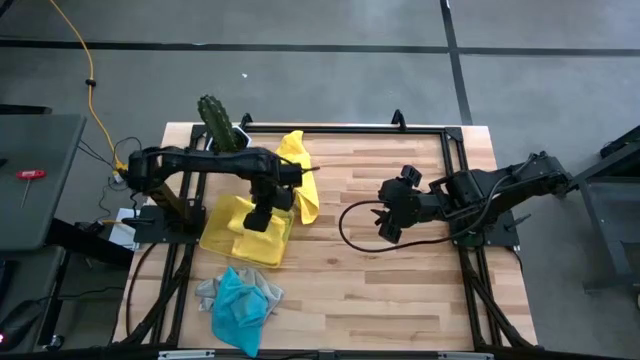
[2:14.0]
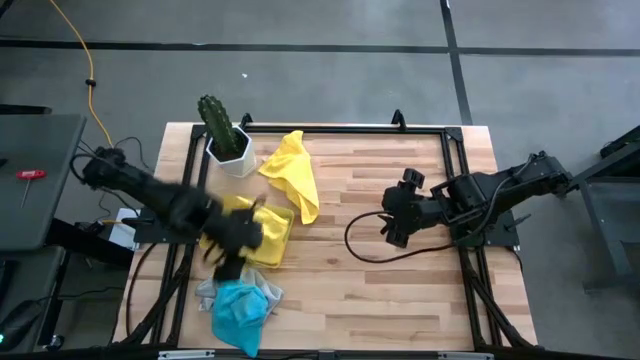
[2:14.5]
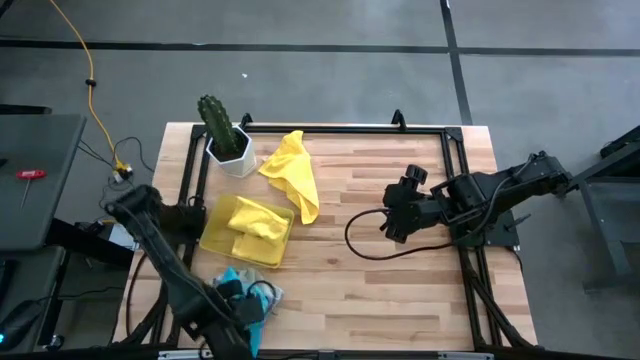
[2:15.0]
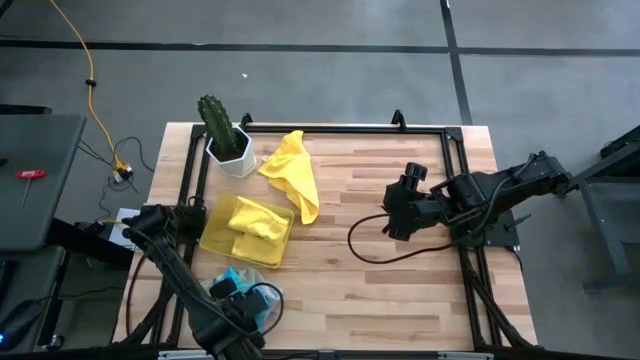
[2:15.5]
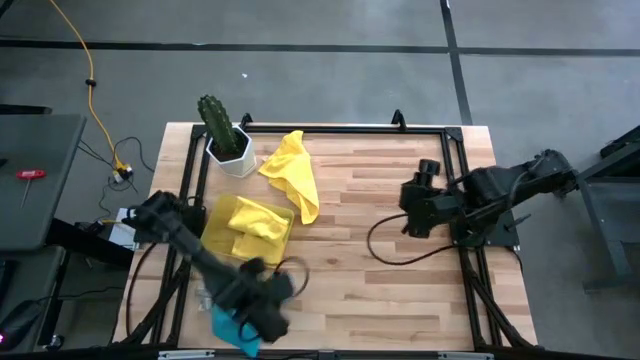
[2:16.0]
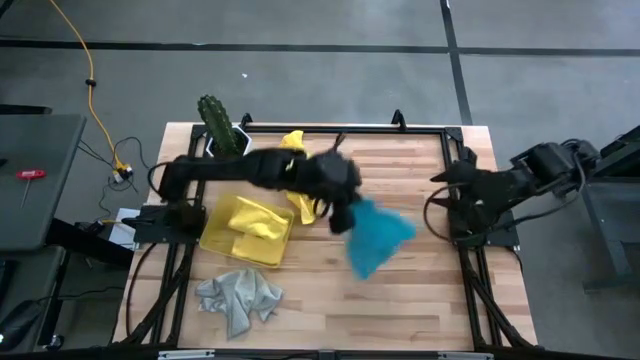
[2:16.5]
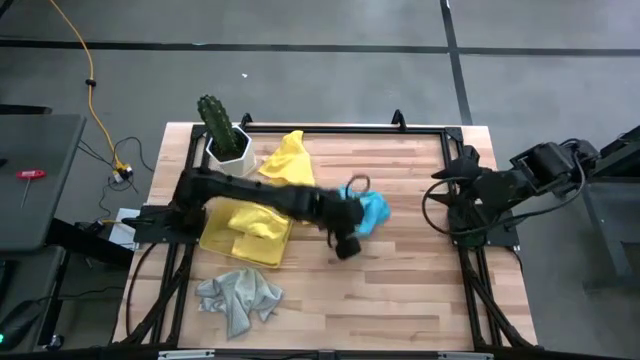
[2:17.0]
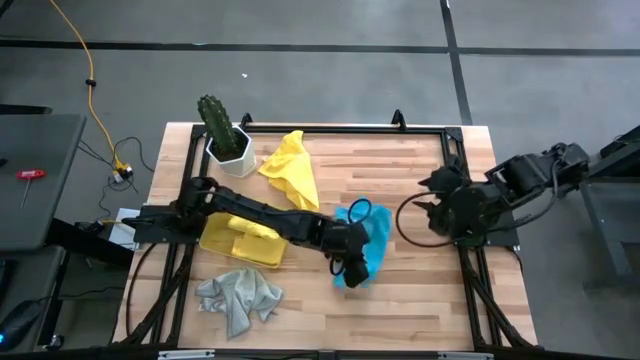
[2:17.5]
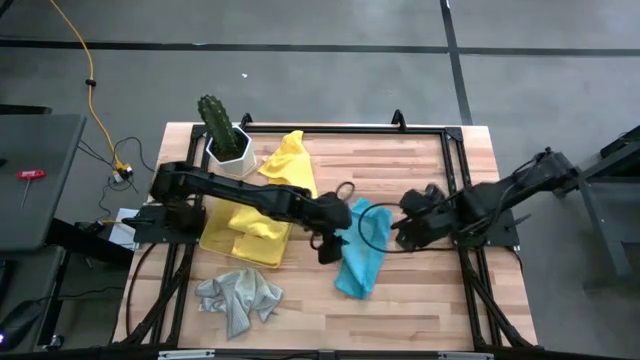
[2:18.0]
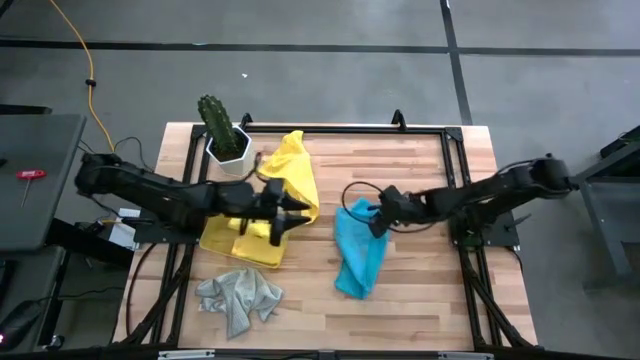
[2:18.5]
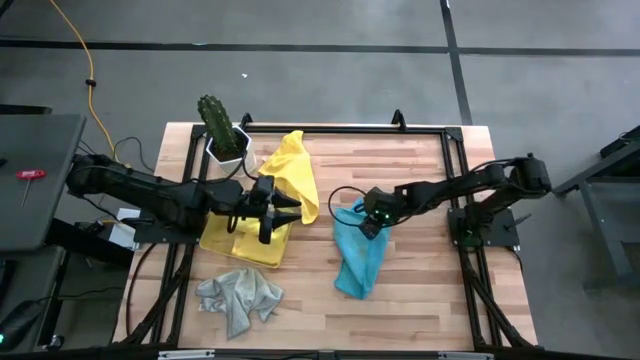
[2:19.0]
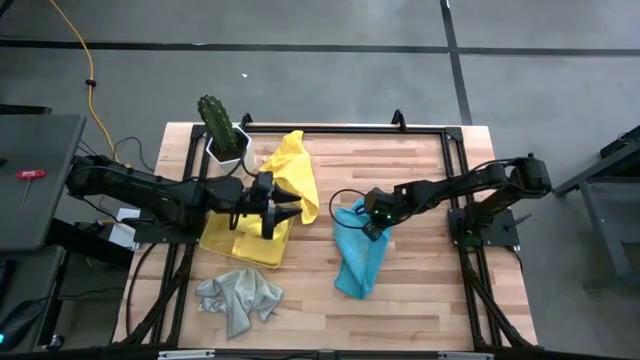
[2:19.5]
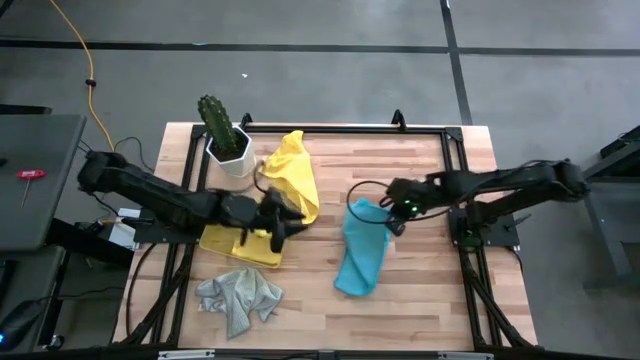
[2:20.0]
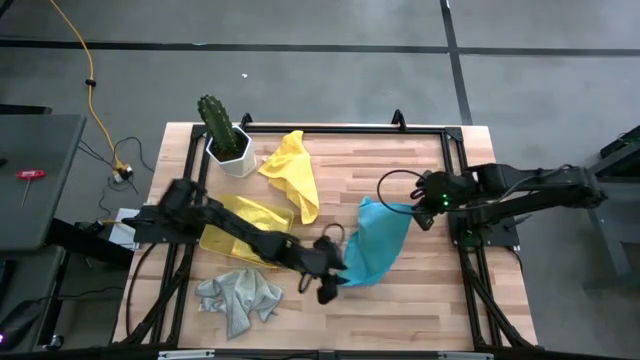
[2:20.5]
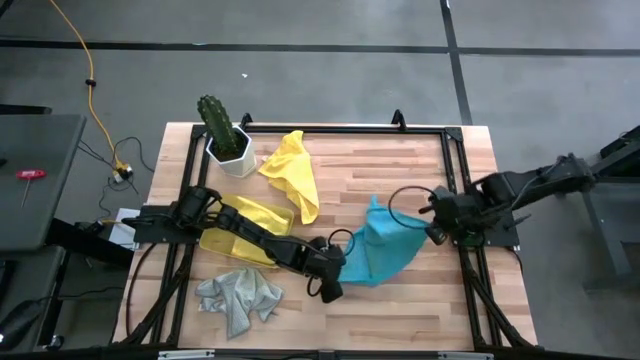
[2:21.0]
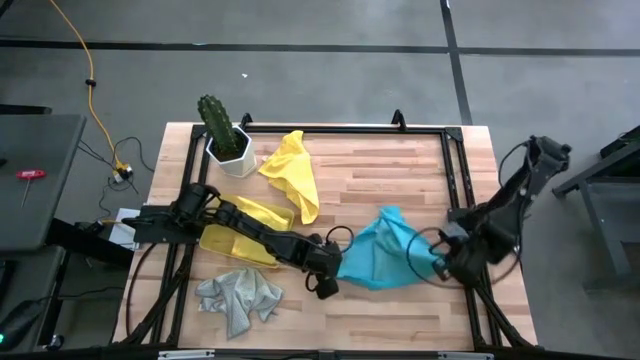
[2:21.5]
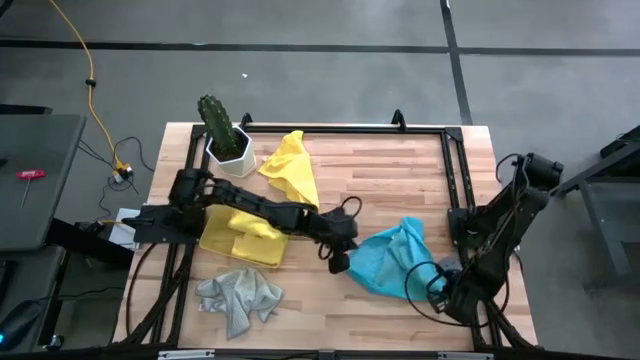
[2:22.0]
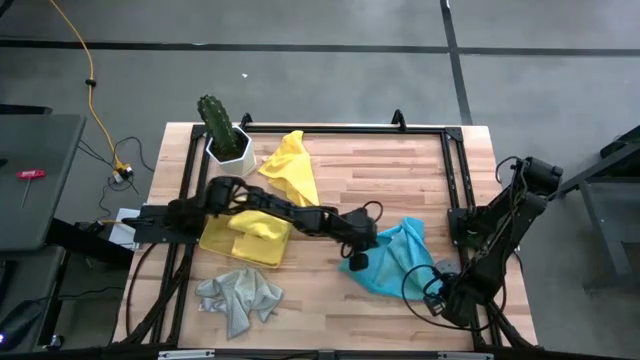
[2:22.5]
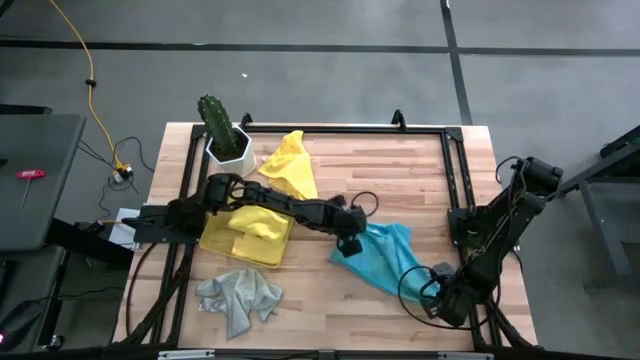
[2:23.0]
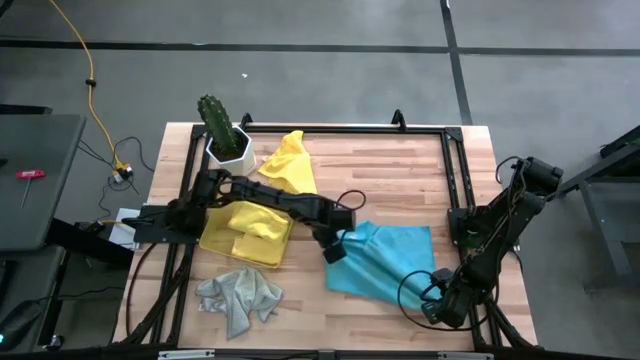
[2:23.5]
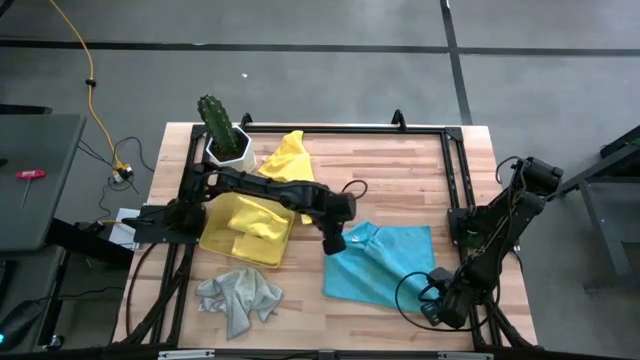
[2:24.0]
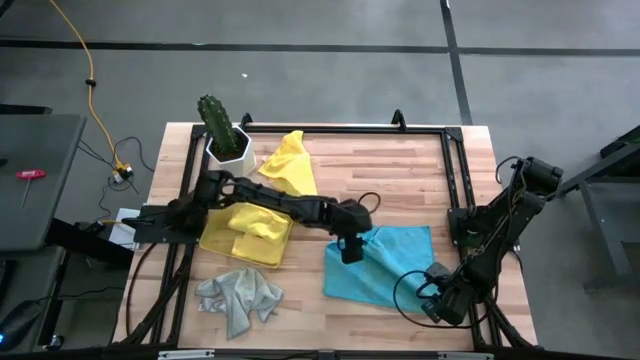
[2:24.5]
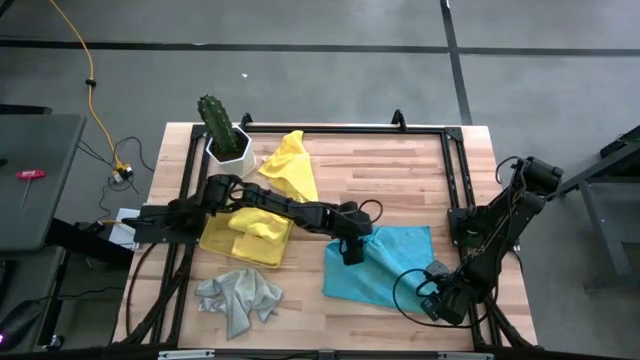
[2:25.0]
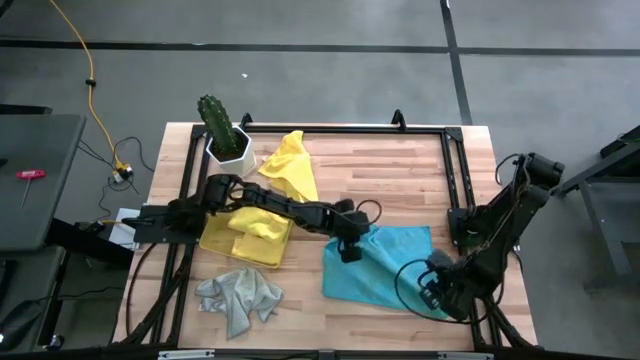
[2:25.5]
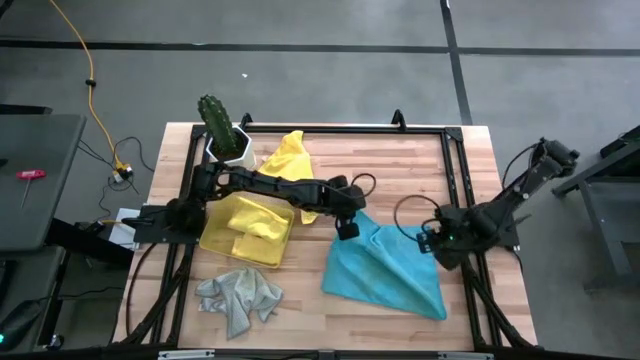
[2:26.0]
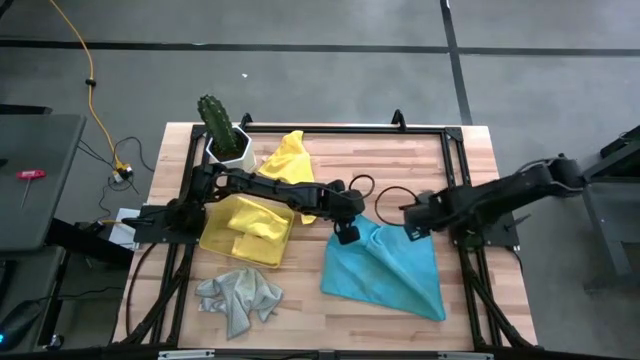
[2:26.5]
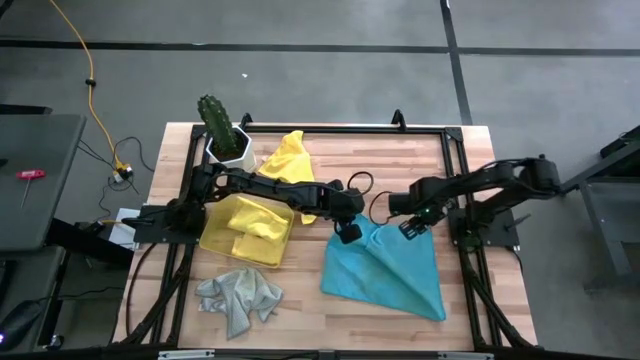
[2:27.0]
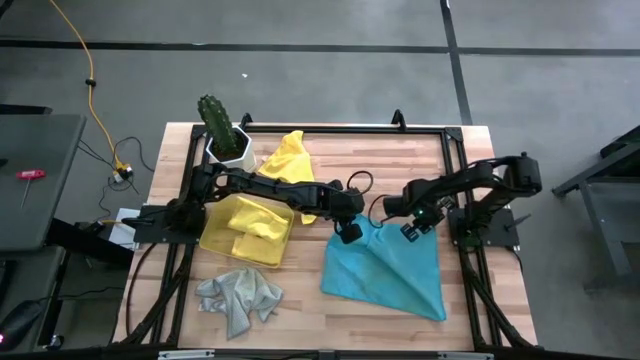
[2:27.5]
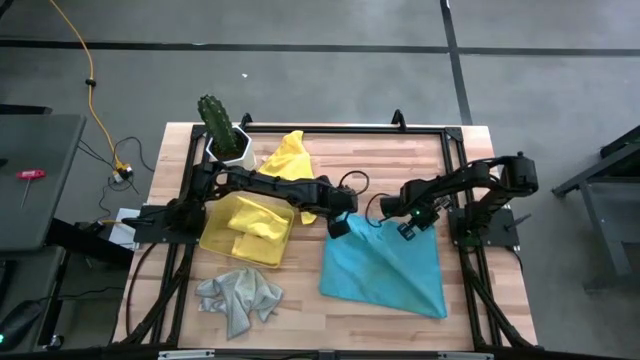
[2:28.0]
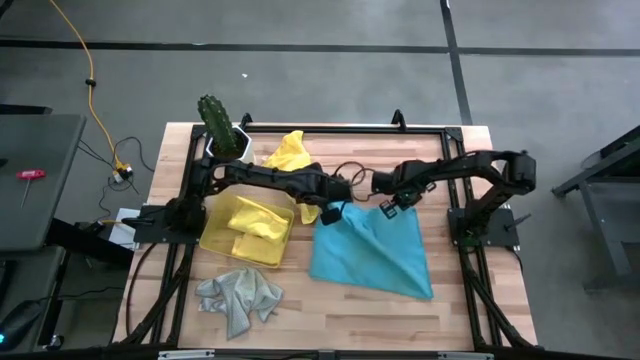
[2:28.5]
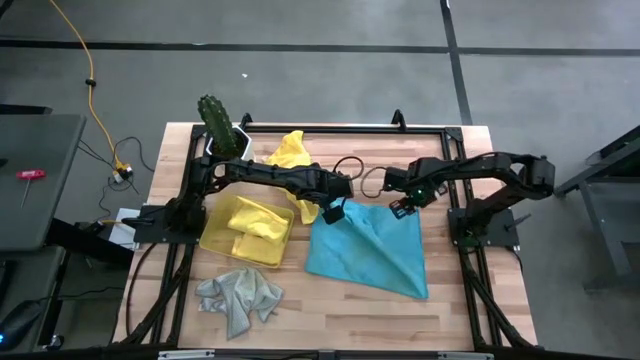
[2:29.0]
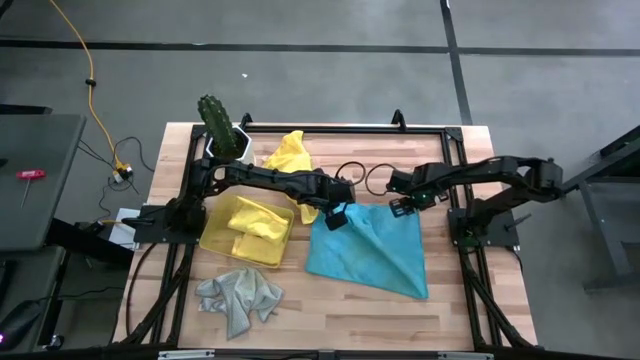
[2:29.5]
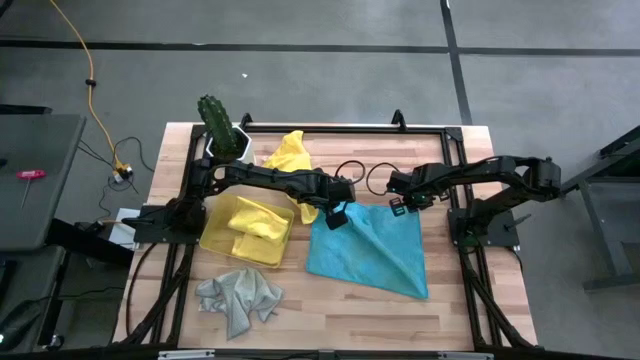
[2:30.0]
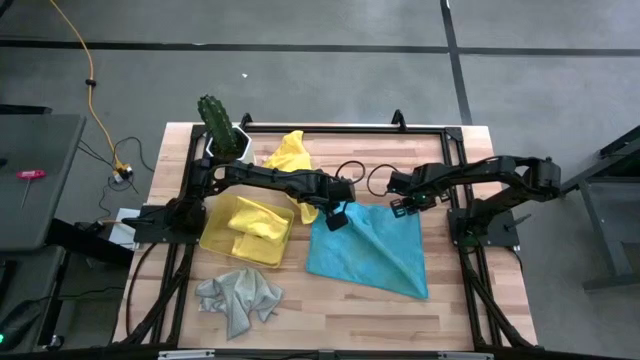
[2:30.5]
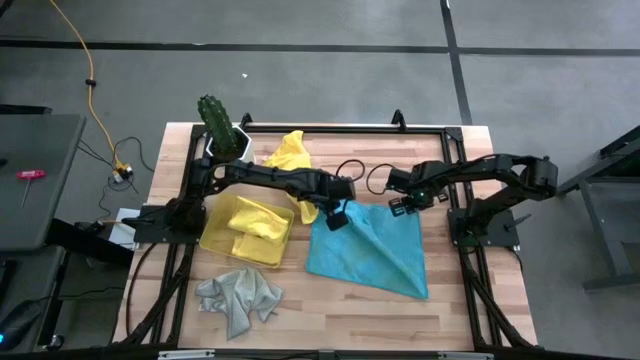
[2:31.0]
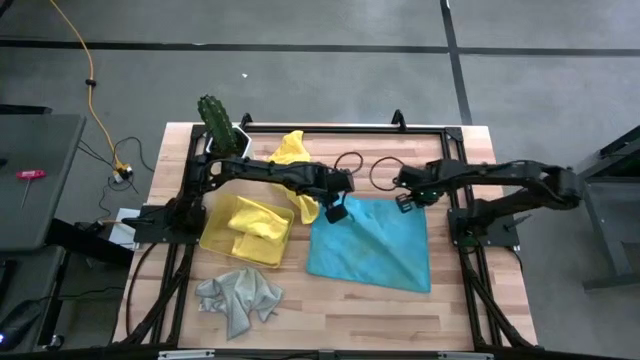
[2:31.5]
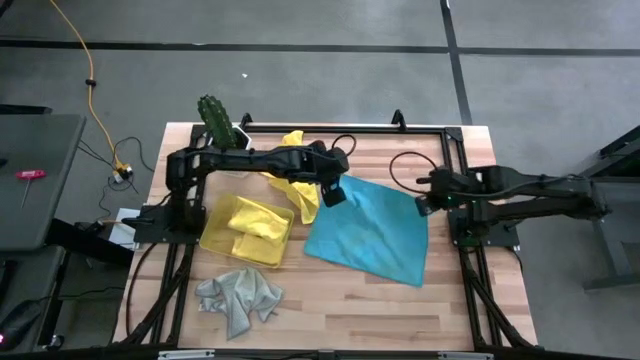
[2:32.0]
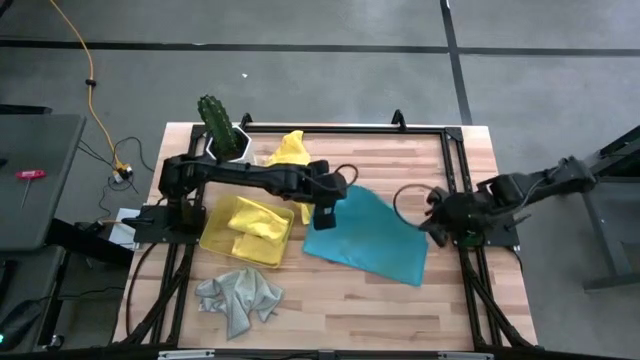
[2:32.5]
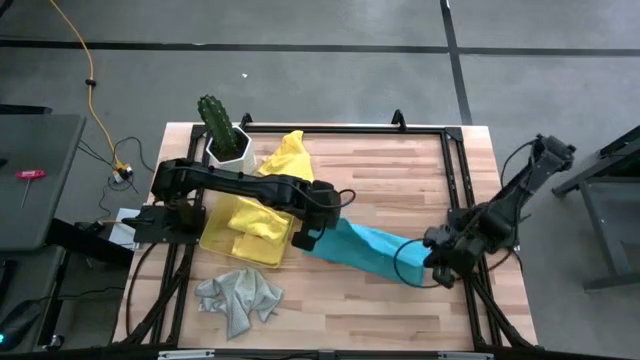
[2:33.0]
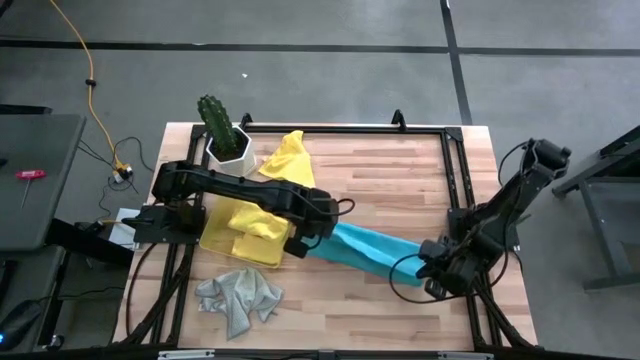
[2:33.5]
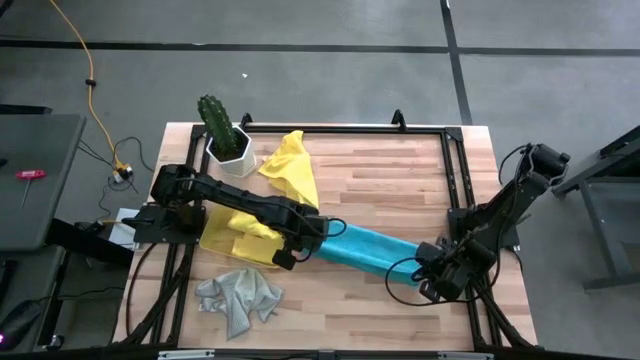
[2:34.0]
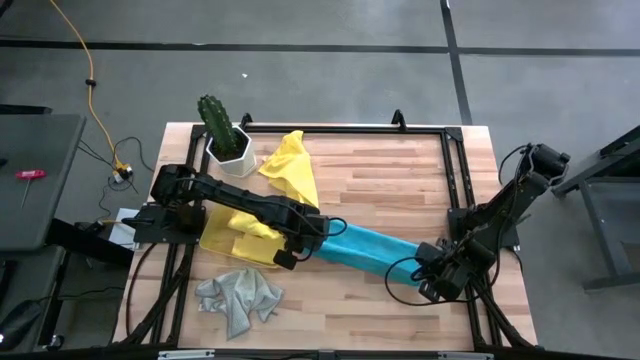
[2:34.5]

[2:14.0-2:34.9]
Task: Fold microfiber towels
Fold the blue microfiber towel
